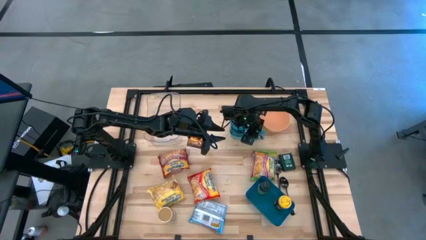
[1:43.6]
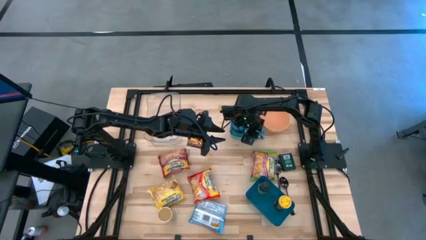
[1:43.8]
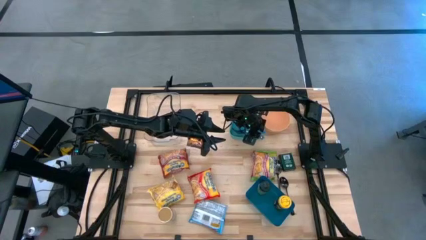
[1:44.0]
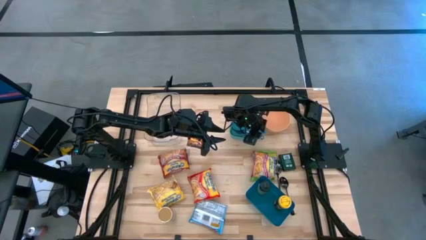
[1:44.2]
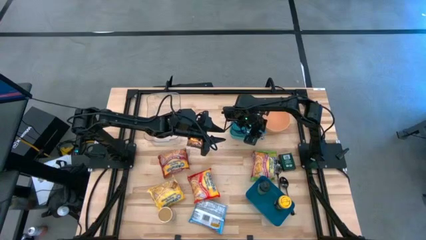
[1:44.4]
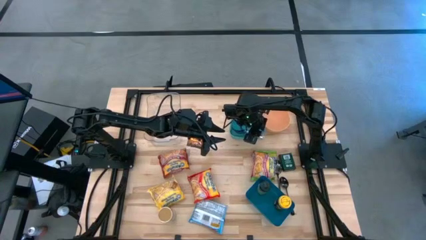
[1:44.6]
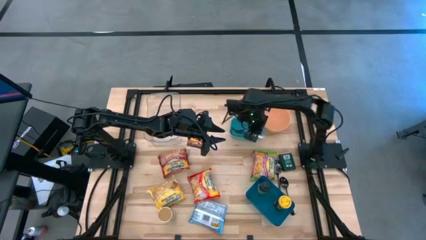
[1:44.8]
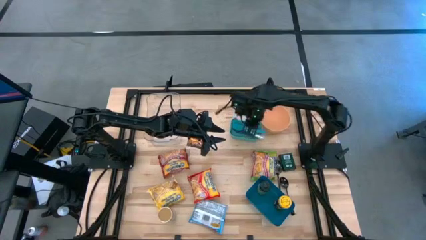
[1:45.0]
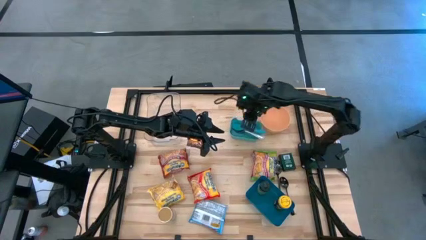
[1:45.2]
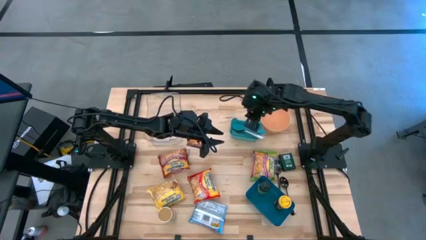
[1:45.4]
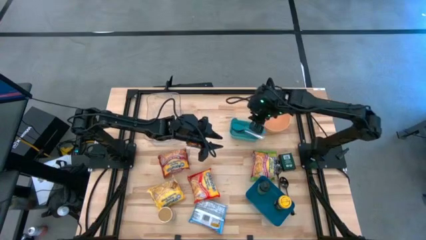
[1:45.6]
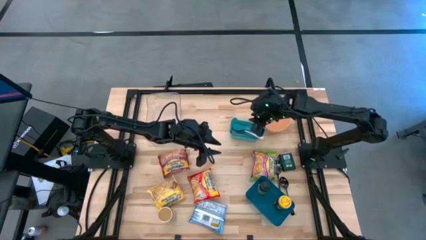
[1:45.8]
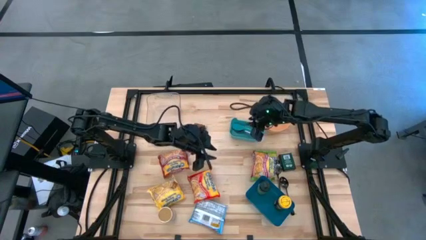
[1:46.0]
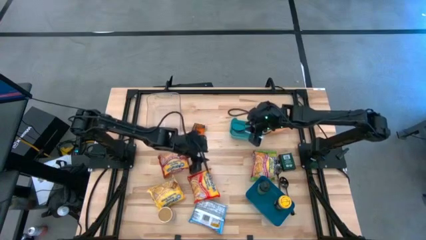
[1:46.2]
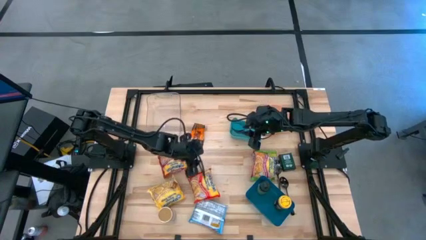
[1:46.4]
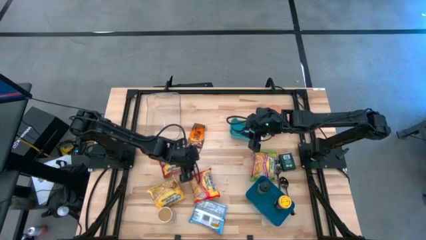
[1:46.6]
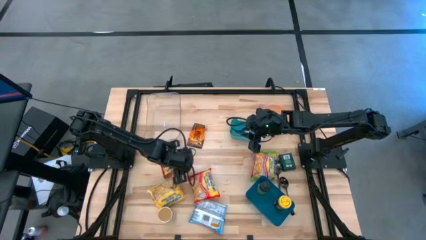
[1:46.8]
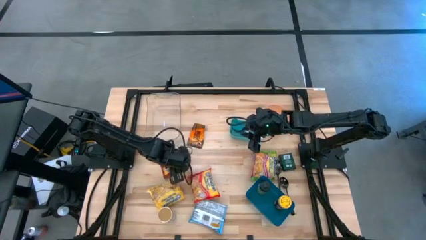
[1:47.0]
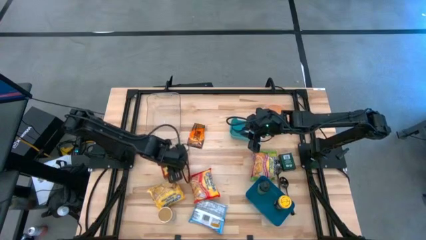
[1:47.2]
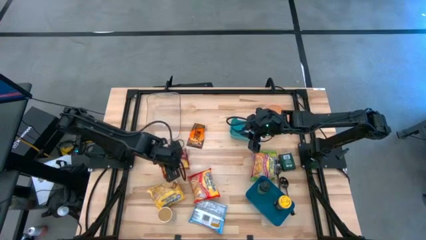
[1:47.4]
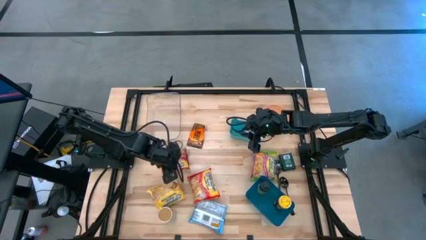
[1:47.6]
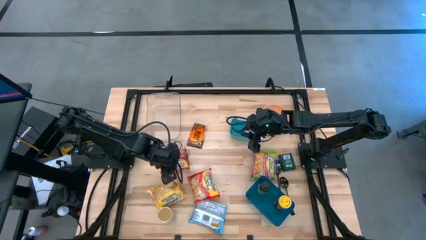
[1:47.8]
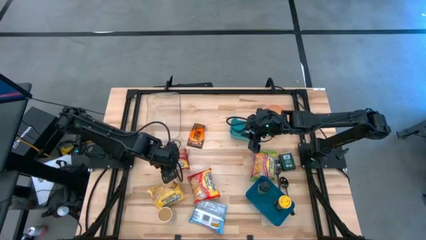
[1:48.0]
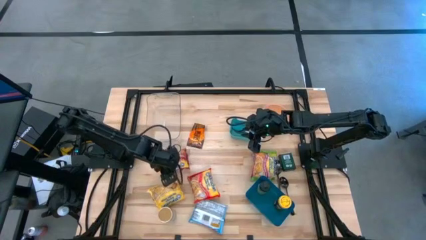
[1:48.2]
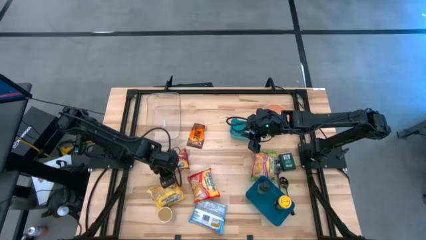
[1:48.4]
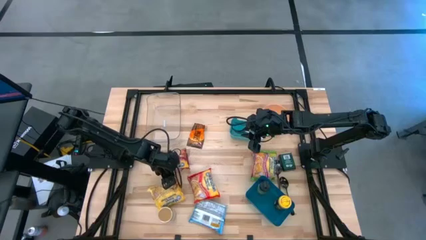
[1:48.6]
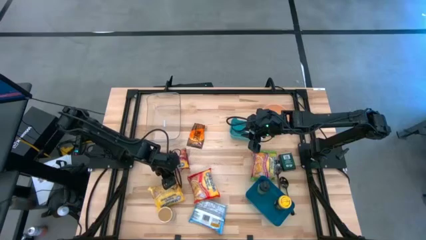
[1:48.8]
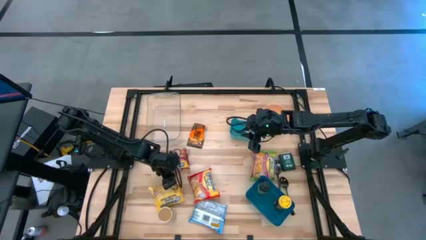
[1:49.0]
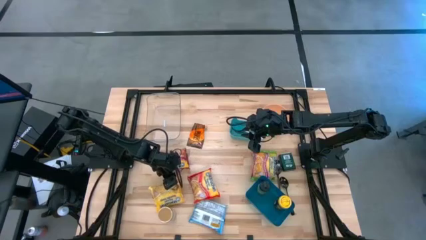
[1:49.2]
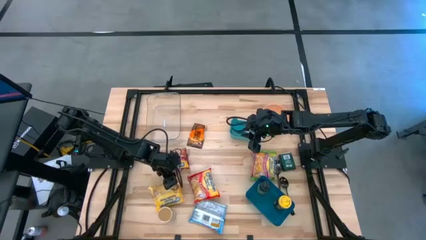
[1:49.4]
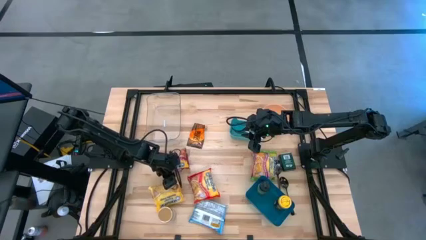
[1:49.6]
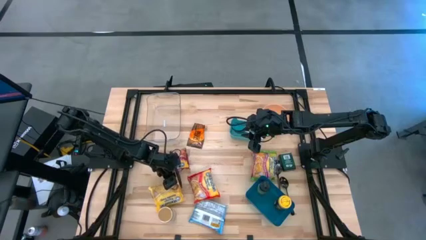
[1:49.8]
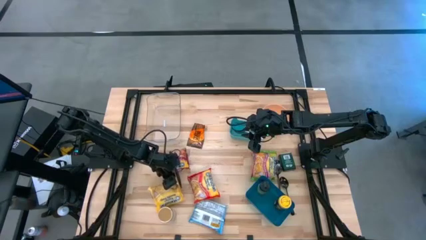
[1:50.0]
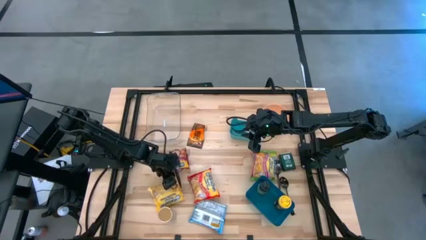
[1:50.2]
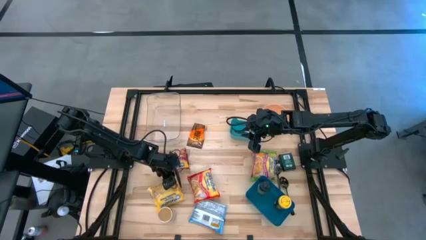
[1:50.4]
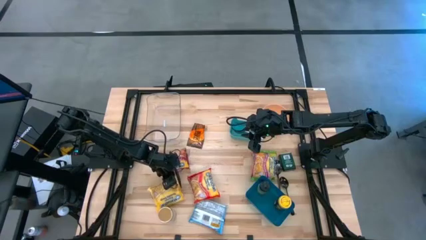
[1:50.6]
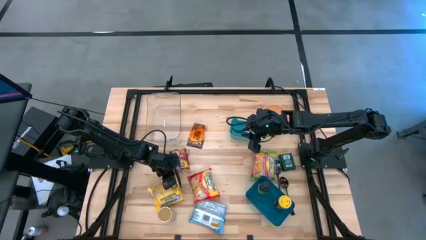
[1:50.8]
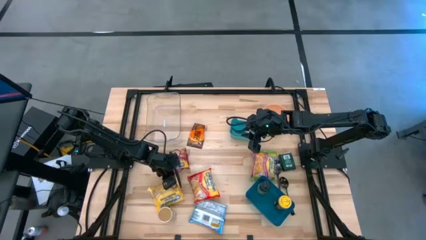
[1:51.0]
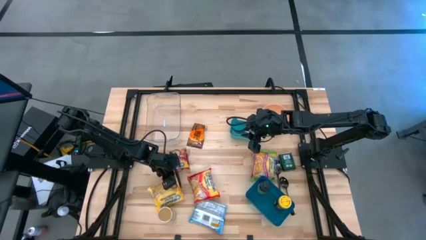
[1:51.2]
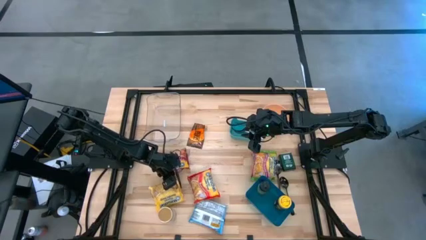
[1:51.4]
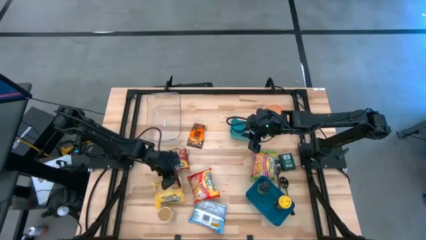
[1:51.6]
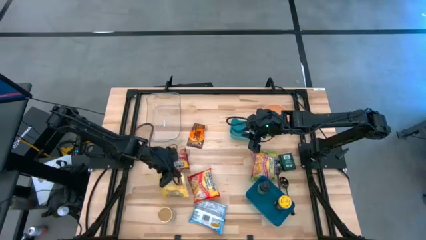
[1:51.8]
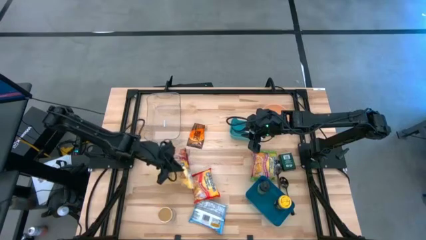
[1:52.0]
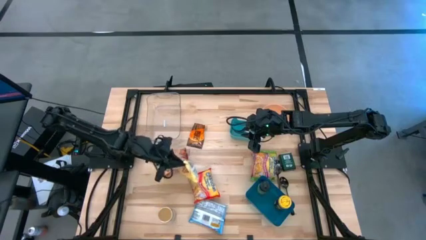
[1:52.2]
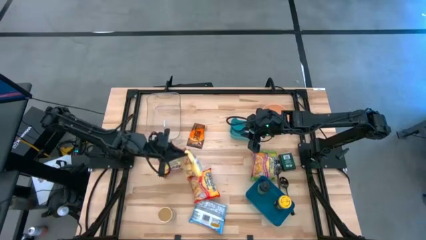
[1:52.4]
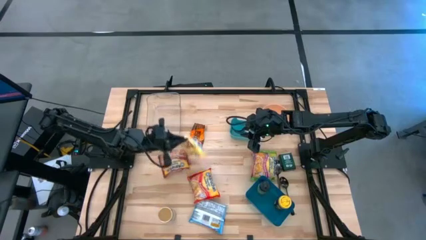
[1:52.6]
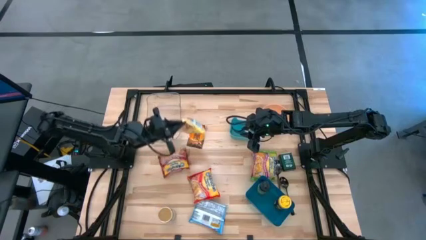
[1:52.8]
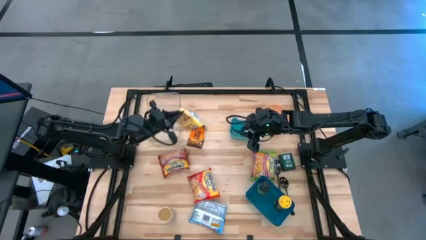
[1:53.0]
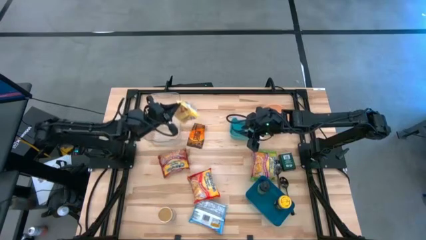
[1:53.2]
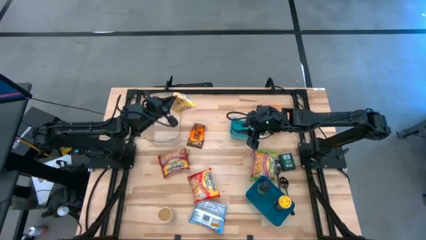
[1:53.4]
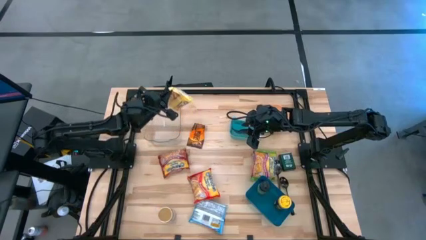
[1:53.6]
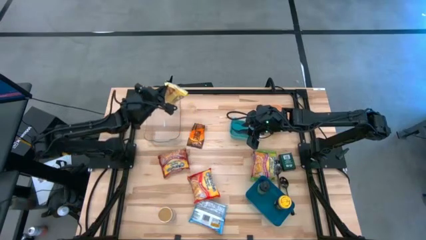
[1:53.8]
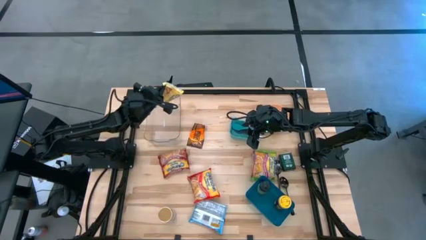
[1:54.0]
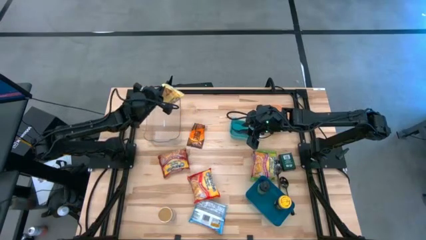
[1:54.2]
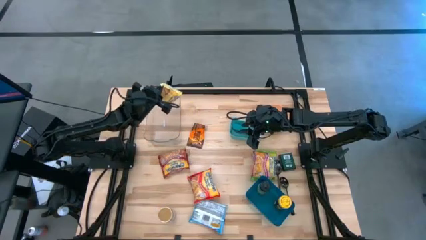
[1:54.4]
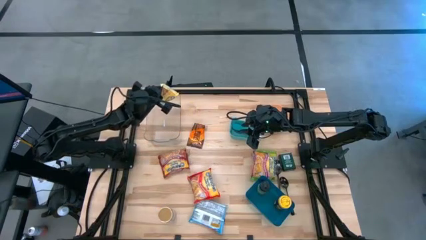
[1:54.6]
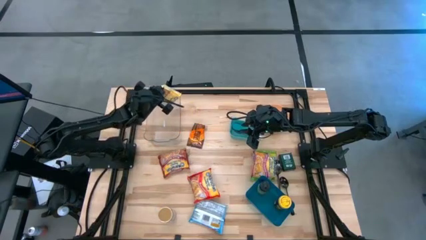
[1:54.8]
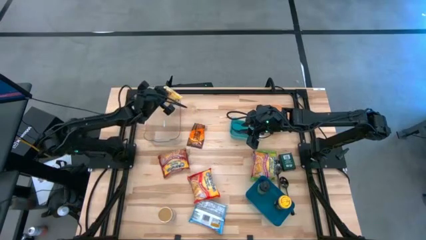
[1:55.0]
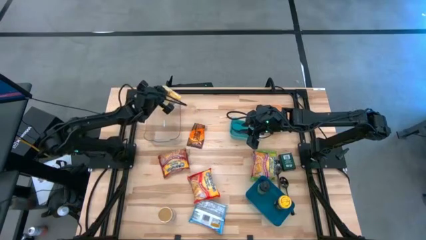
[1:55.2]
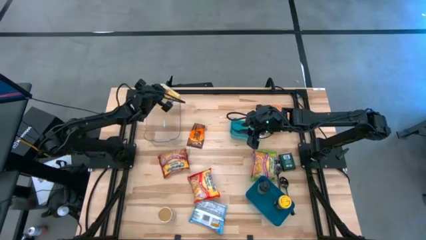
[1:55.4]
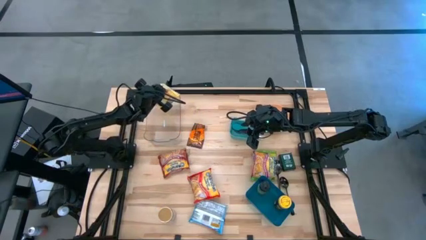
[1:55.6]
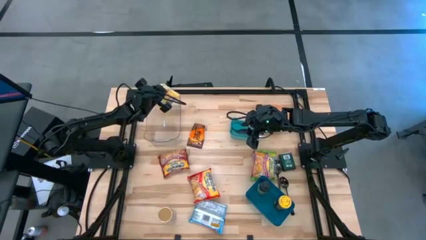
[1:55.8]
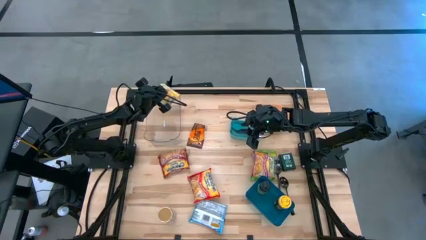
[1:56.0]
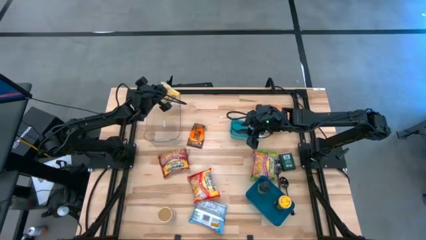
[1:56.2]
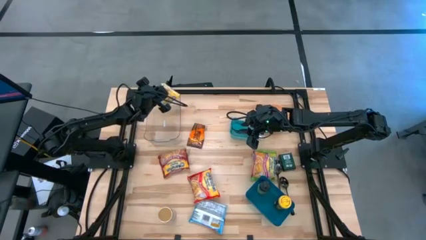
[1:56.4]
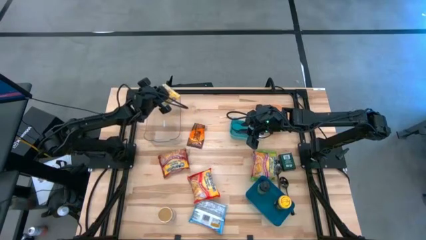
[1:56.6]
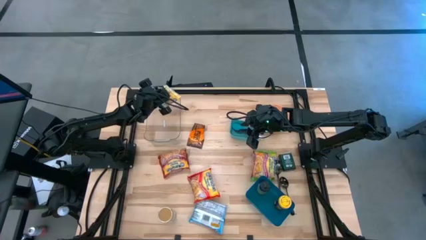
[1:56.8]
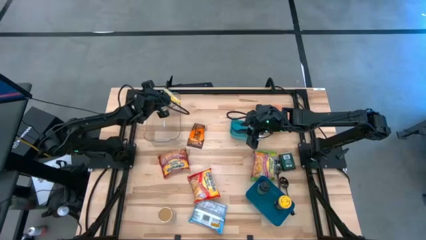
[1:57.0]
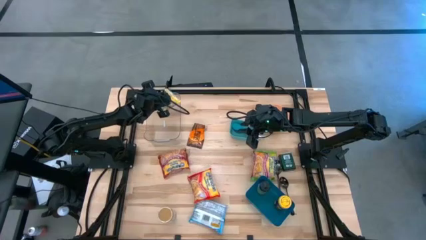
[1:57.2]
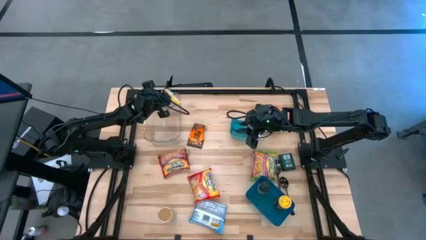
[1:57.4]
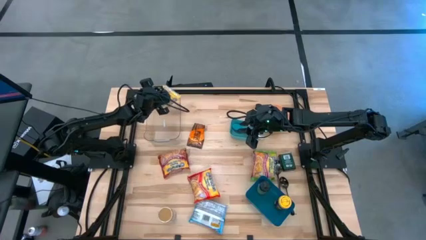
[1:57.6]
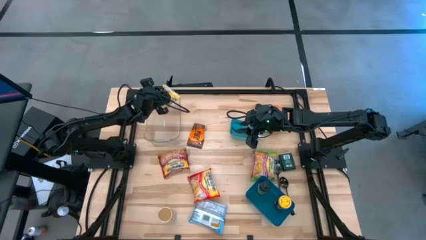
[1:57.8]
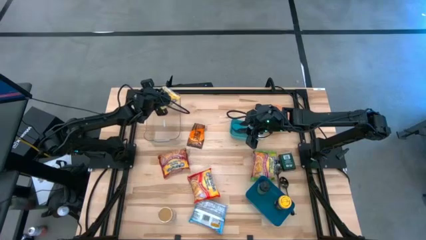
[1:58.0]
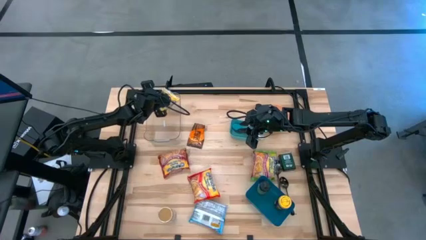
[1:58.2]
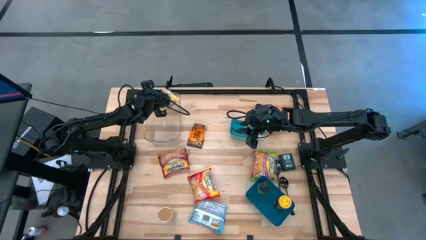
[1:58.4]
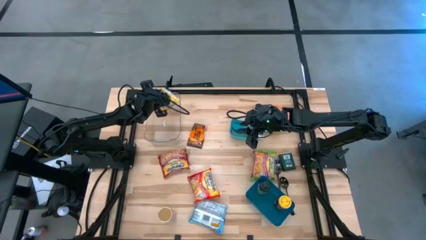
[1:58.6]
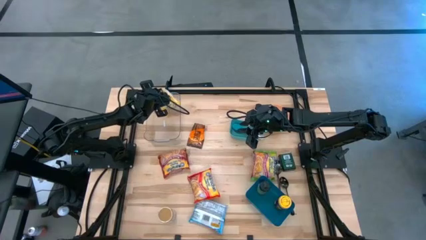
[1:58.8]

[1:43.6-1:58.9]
Task: Pick & Place Food Item
Put the yellow noodle pack into the transparent bin

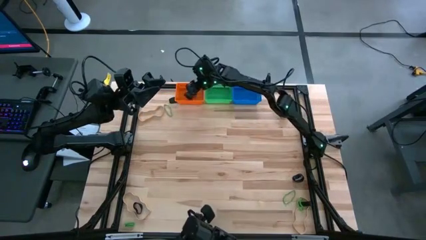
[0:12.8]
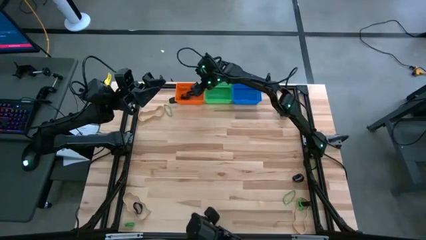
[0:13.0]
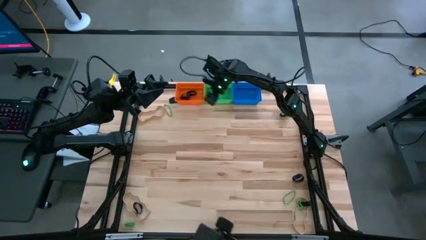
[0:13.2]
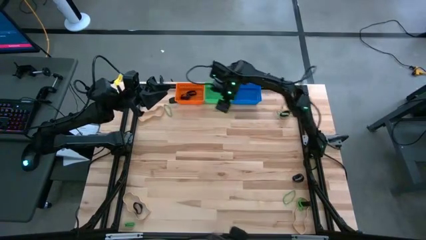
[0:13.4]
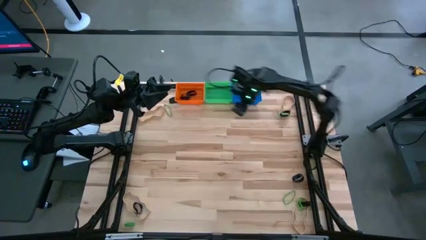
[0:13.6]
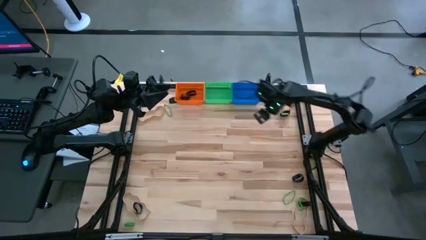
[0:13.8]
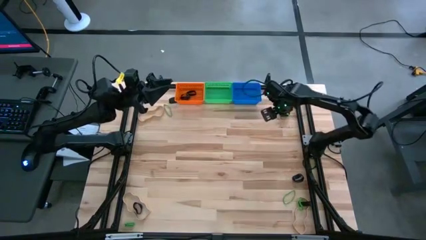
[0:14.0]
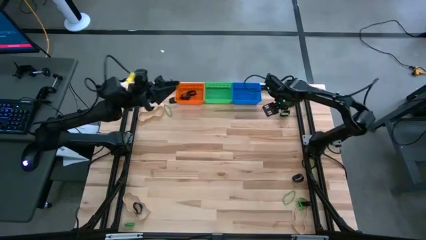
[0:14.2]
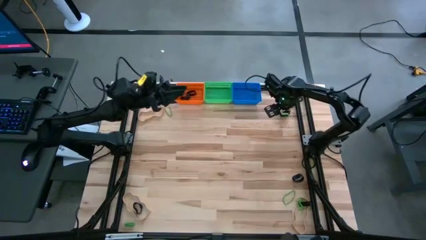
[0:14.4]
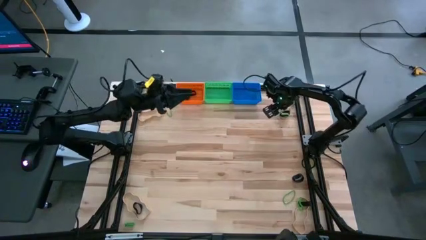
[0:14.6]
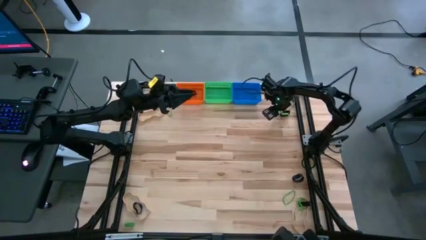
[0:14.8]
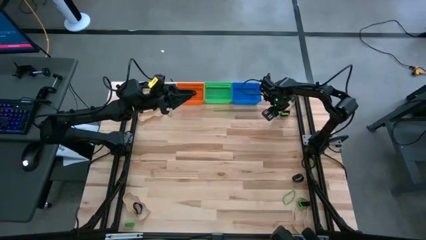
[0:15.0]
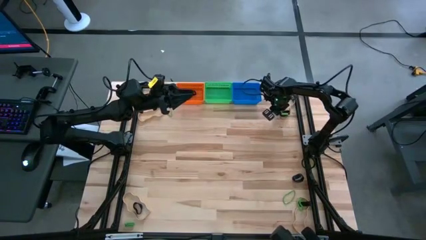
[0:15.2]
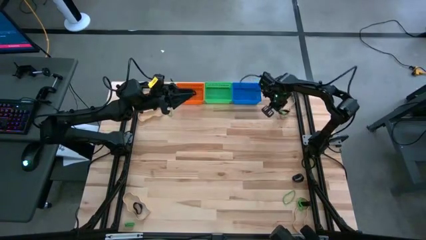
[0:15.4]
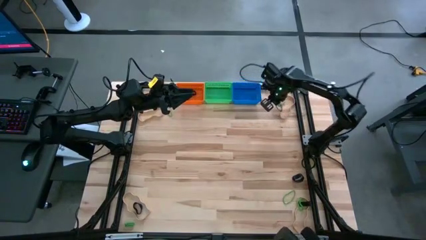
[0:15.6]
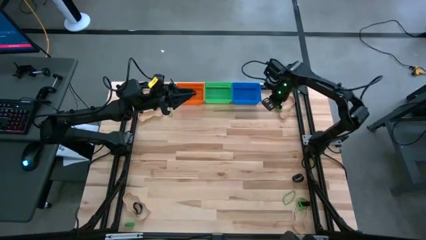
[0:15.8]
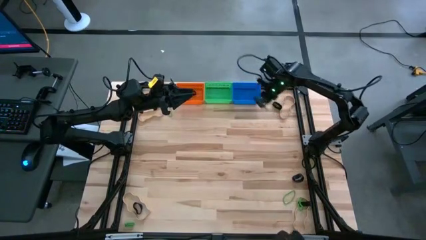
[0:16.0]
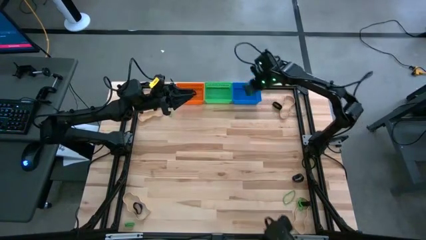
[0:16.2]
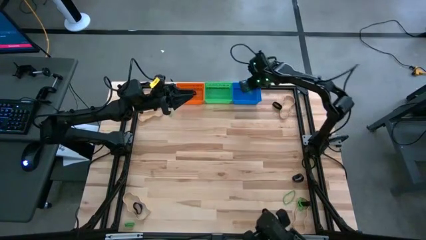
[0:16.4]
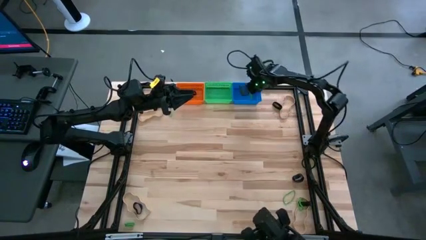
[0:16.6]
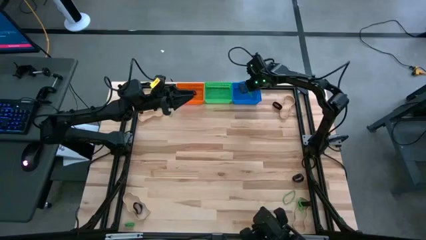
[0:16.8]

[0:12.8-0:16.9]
Task: Sort rubber bands into baskets
Put the green rubber band into the blue basket
